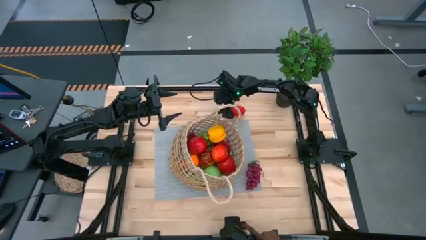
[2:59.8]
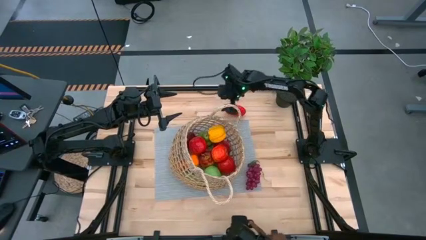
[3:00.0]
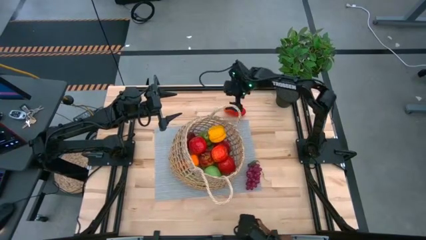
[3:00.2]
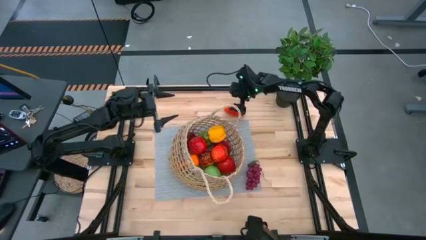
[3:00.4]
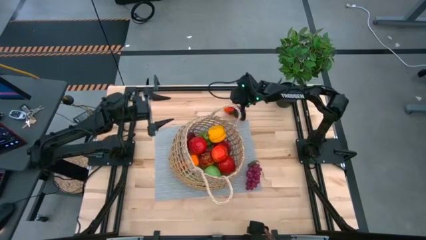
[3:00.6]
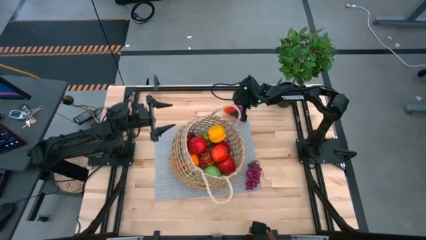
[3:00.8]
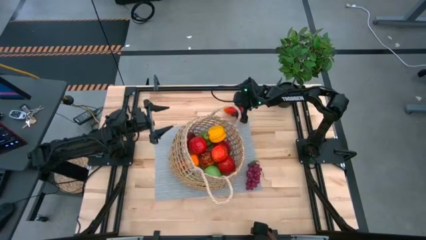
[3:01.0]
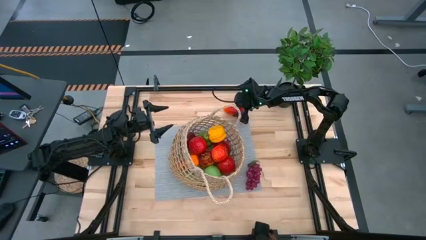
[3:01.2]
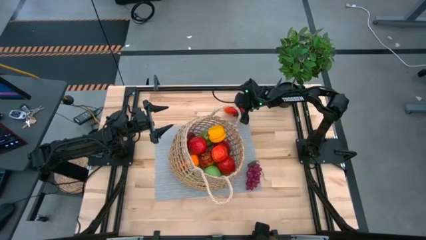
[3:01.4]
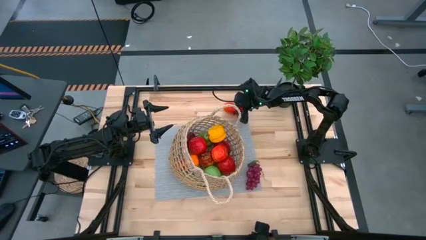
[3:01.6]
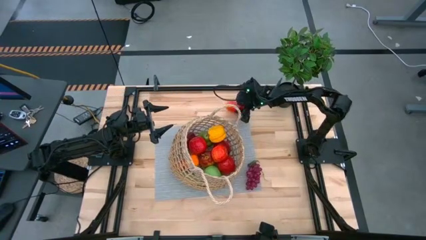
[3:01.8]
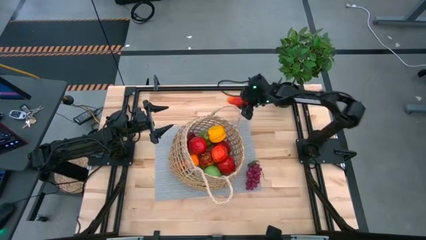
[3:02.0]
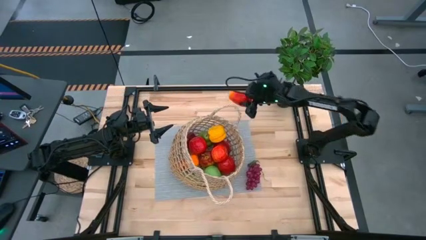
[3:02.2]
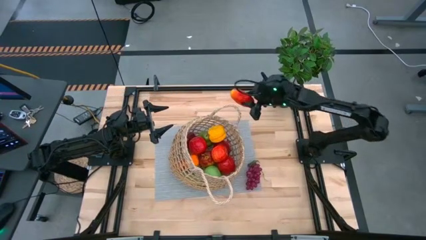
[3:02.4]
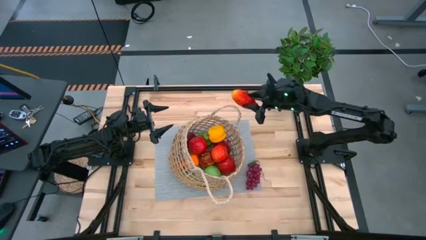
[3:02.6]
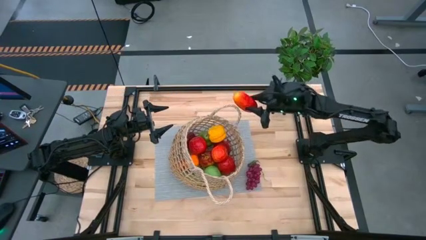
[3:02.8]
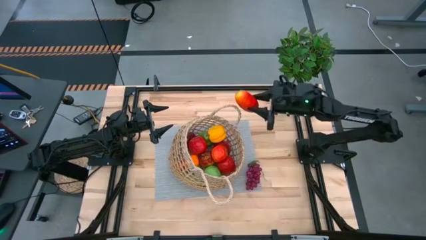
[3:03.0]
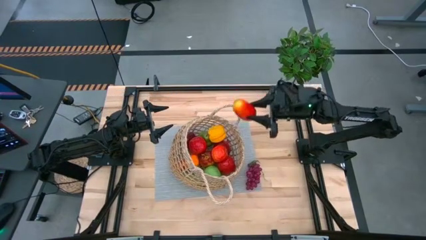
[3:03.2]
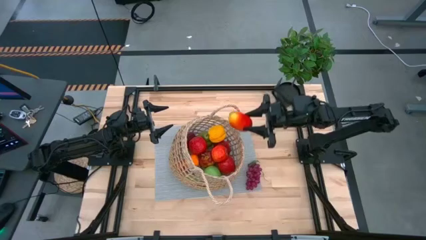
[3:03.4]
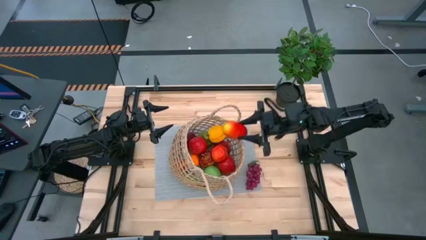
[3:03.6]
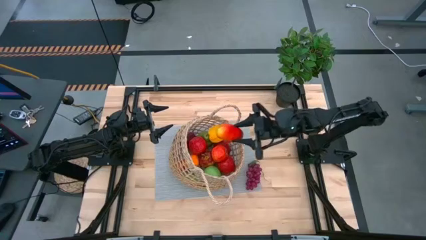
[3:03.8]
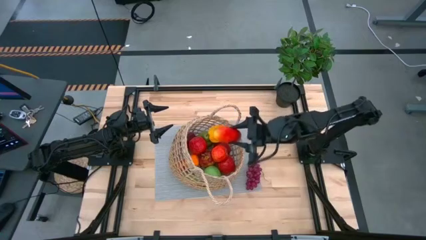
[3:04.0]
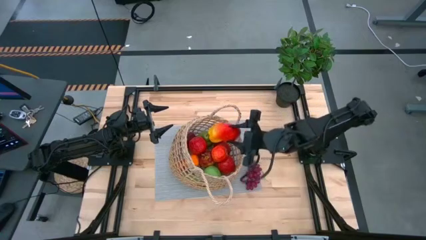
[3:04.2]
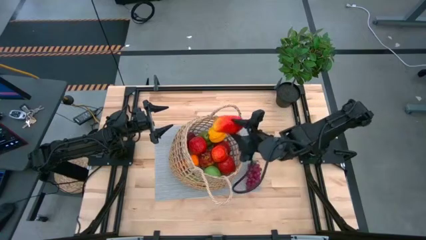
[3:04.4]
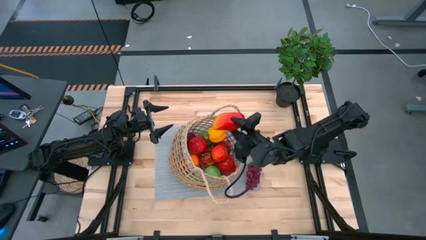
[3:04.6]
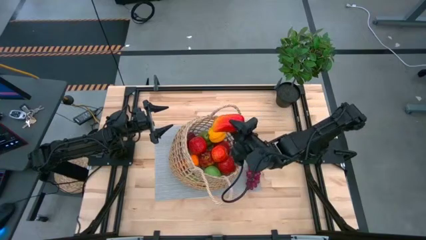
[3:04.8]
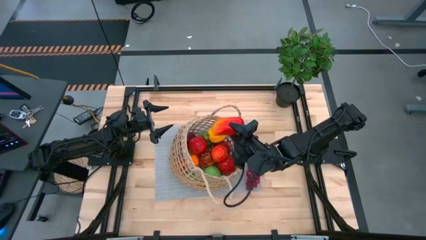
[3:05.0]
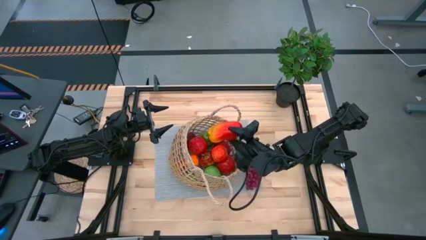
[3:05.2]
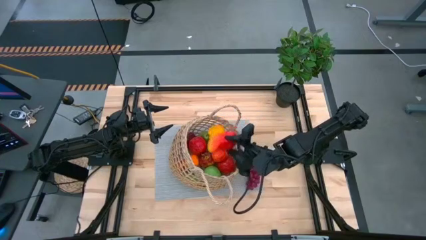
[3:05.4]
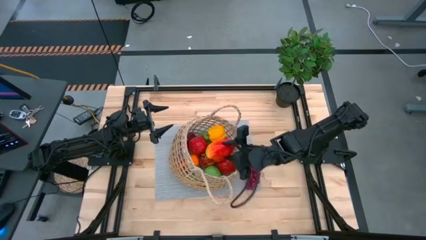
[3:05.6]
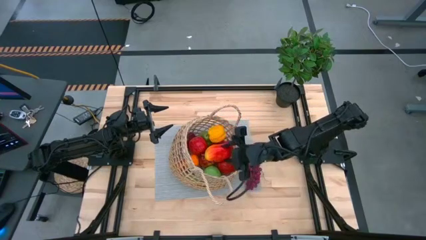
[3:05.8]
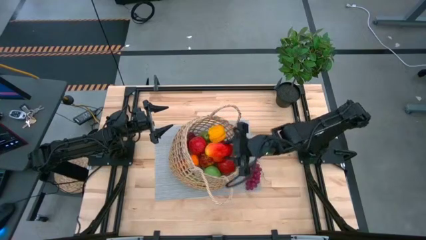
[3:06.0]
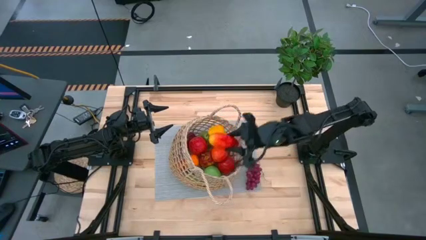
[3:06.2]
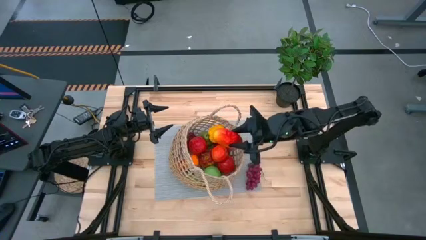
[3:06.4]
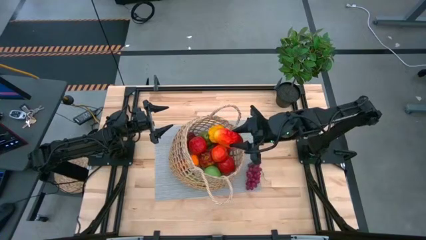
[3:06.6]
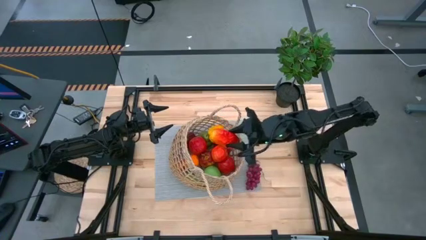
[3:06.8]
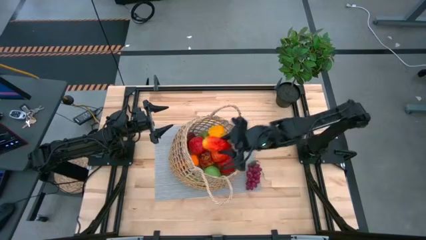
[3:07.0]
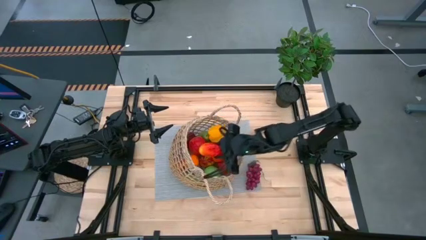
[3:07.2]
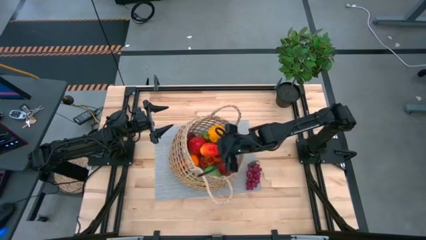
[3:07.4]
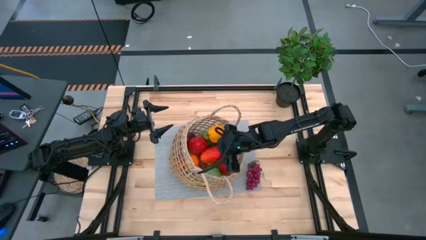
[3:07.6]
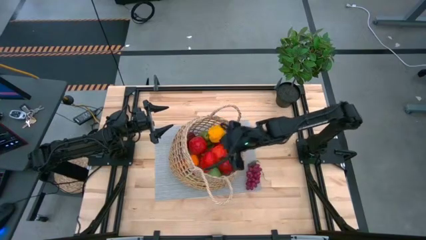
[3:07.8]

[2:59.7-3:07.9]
Task: Build produce basket
Put the red mango into the mesh basket

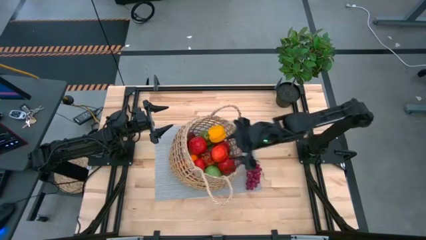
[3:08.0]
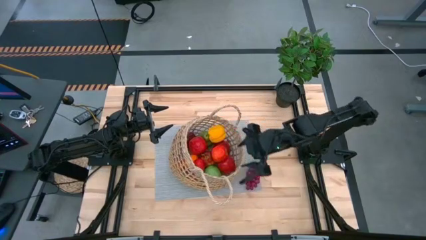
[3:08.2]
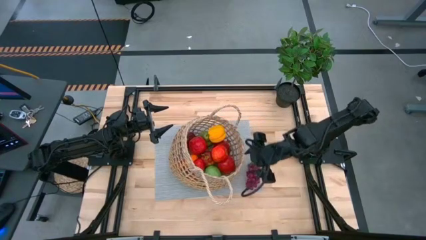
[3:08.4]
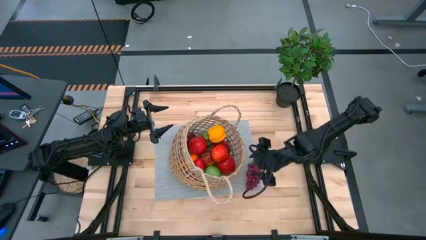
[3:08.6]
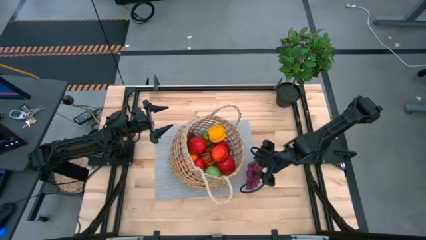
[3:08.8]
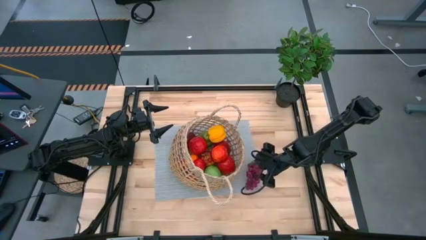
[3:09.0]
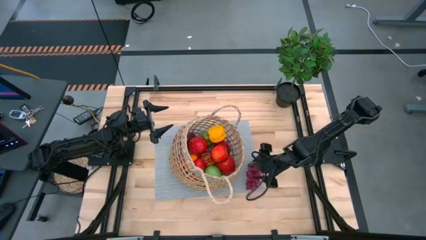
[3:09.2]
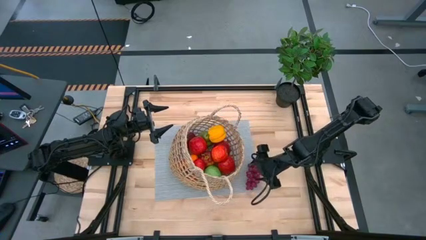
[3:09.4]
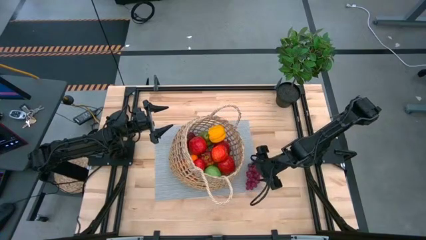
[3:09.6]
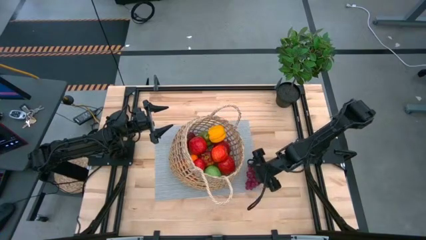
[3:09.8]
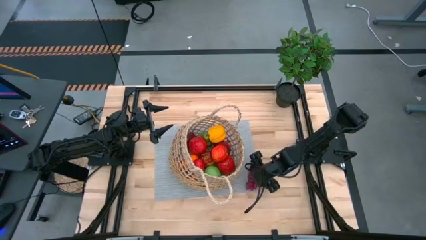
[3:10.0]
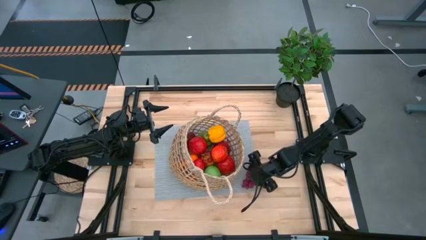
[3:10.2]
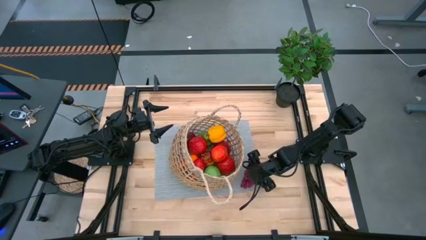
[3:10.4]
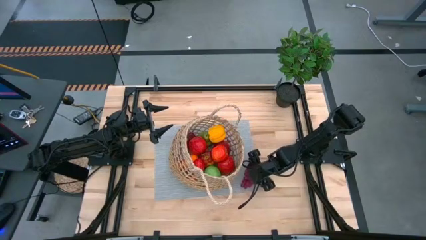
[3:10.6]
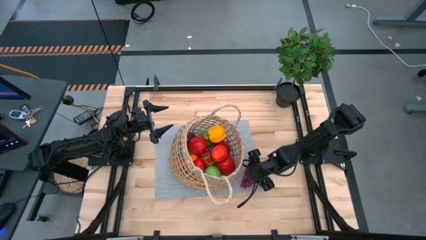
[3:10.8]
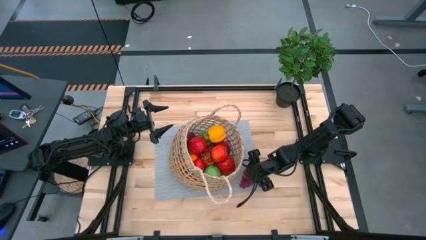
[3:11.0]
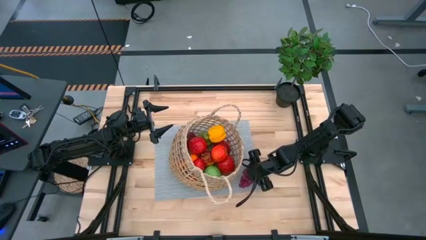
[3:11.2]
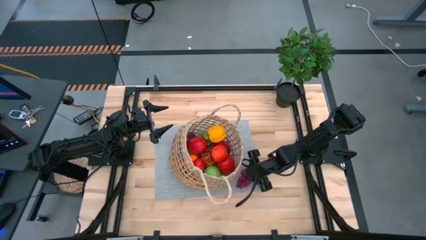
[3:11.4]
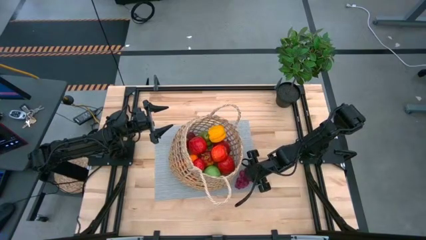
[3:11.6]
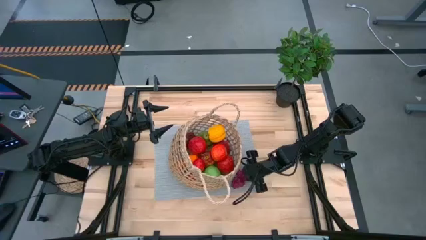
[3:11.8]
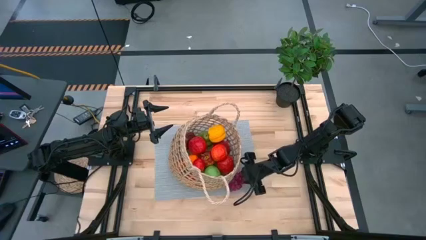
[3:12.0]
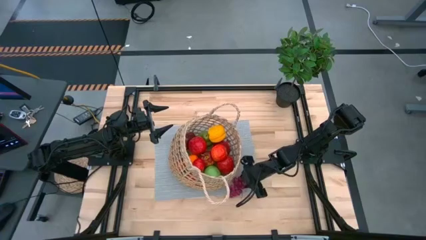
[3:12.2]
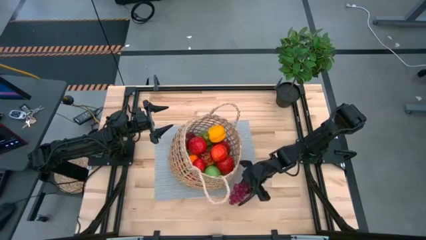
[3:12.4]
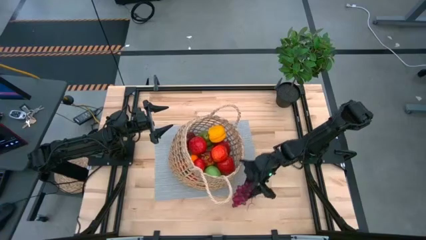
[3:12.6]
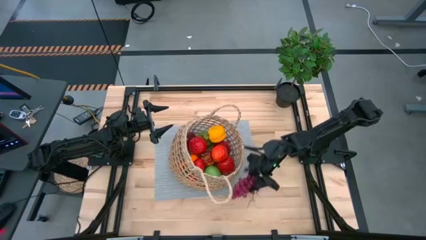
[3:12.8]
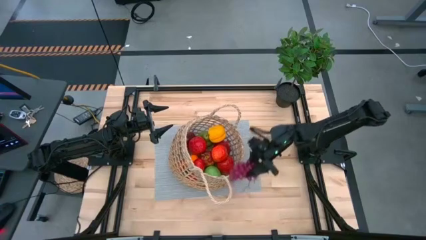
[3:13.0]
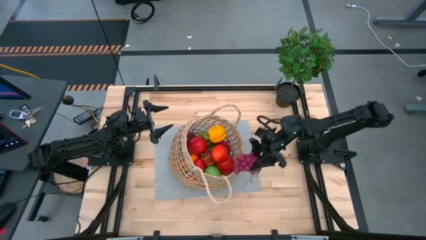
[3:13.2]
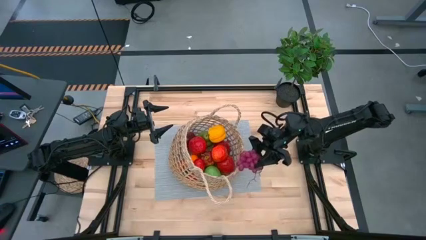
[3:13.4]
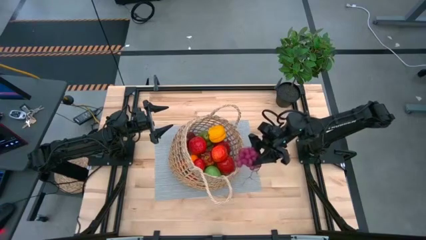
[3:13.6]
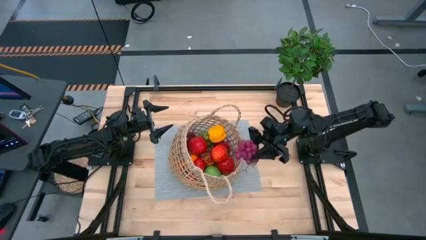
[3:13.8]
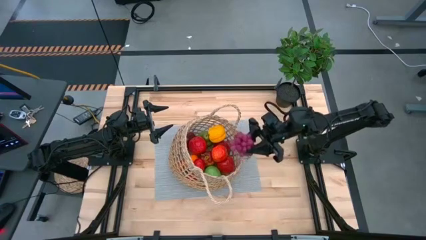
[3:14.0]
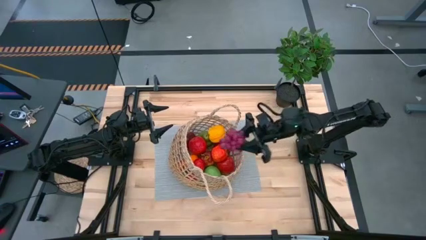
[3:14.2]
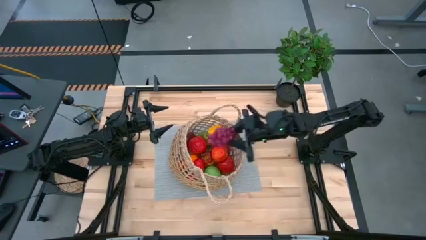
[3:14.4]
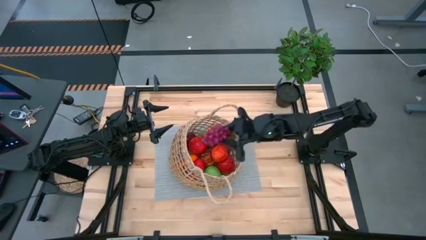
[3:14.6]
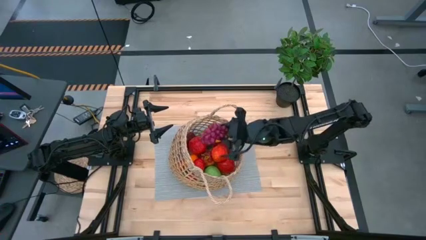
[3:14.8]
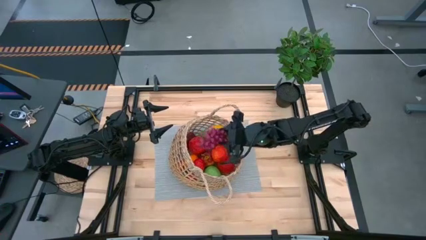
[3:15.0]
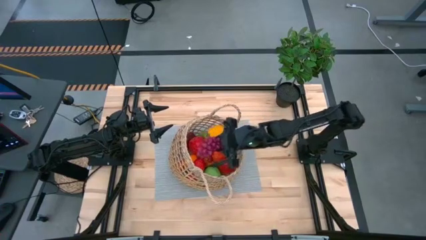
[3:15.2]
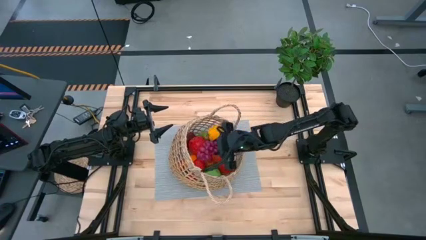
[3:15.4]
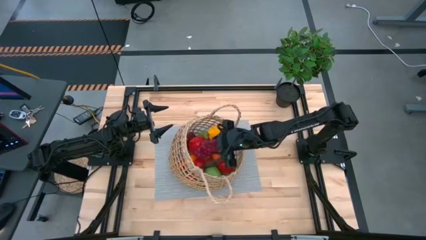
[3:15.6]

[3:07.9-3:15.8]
Put the grapes into the mesh basket

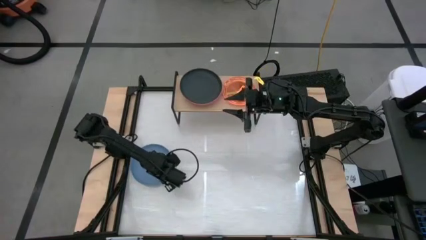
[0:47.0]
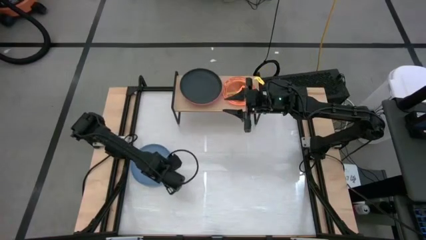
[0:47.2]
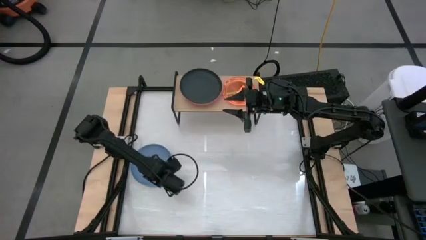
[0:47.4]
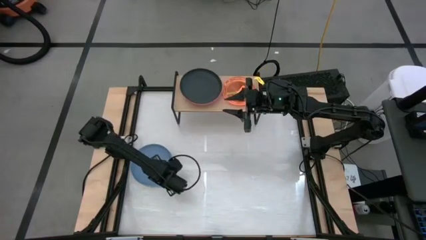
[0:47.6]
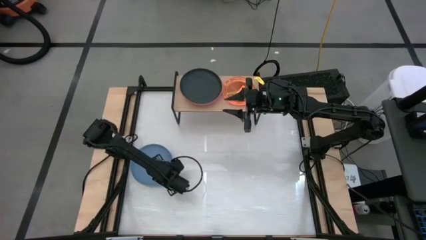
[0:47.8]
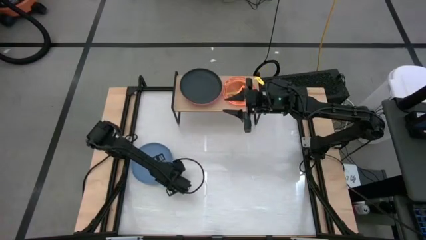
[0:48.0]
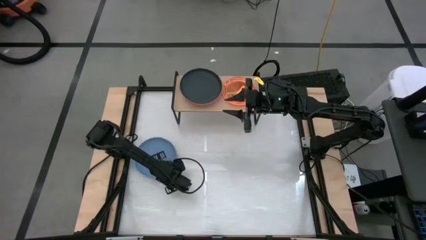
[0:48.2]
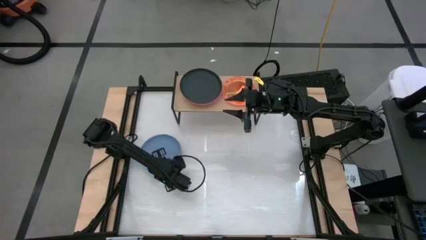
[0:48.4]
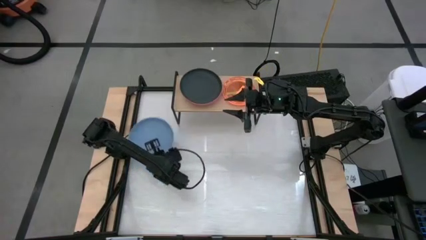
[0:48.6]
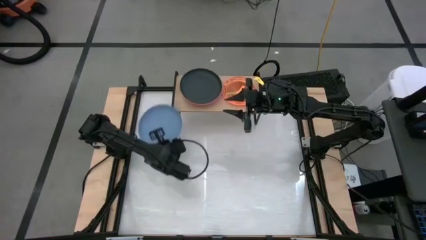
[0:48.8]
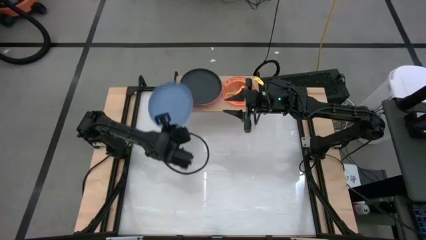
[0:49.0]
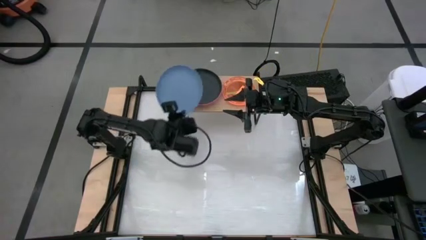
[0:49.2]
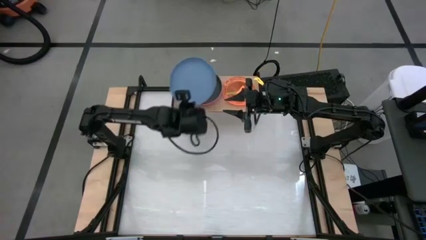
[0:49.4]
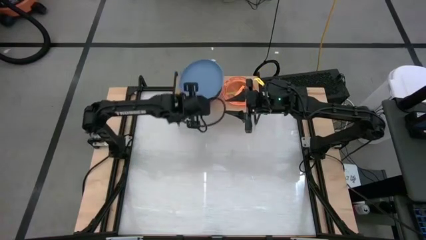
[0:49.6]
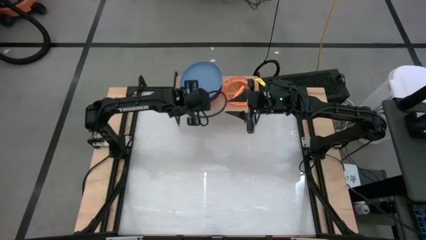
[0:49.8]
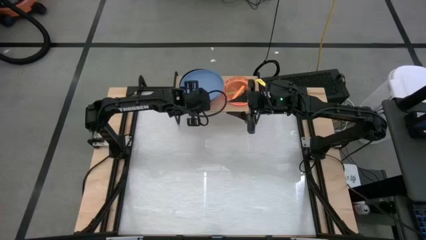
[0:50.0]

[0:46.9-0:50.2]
Task: Place and stack plates onto a shelf
Stack the blue plate on top of the black plate on the shelf
